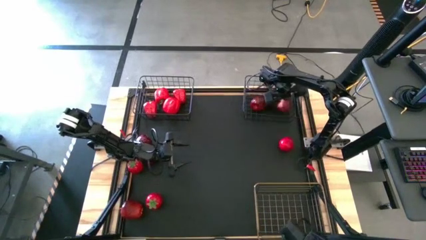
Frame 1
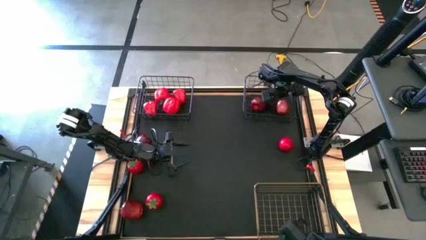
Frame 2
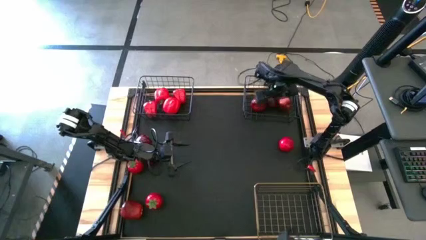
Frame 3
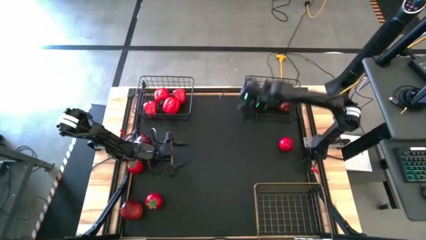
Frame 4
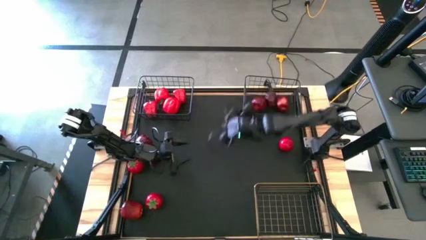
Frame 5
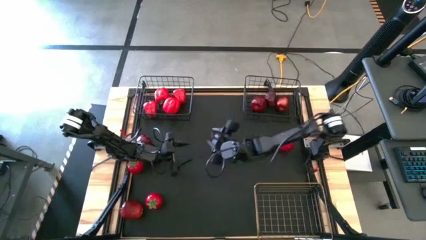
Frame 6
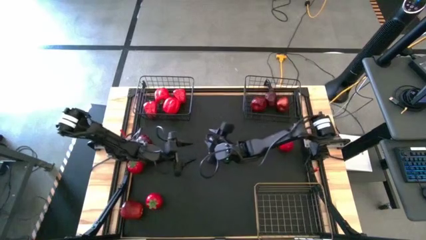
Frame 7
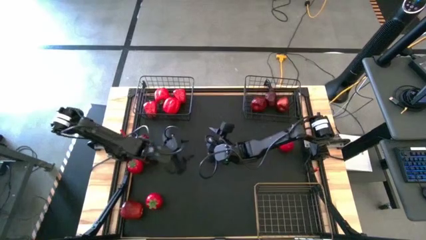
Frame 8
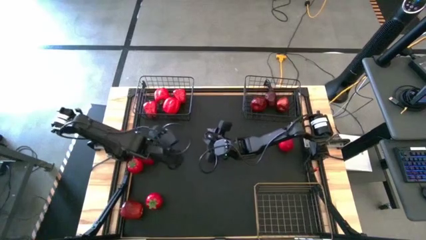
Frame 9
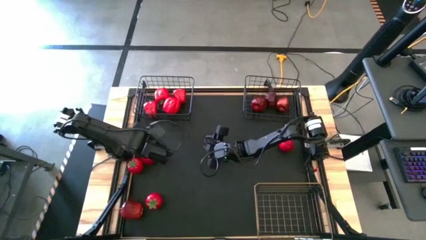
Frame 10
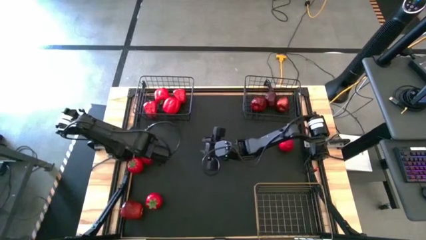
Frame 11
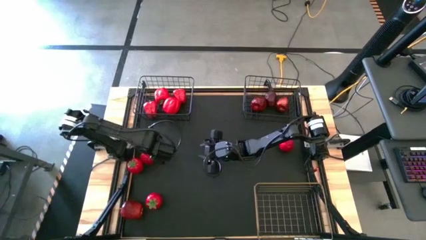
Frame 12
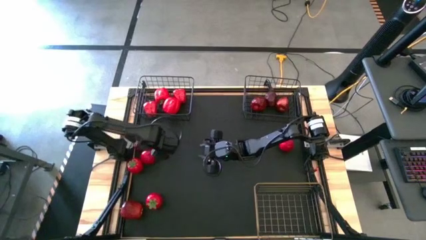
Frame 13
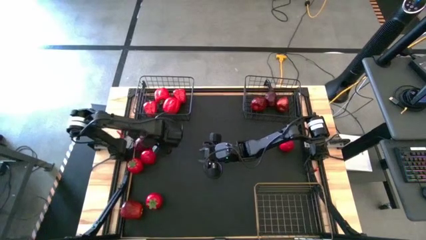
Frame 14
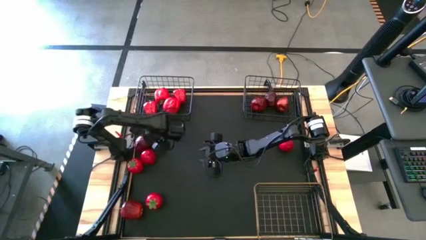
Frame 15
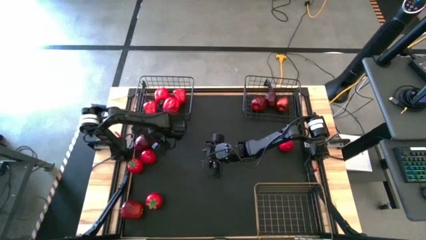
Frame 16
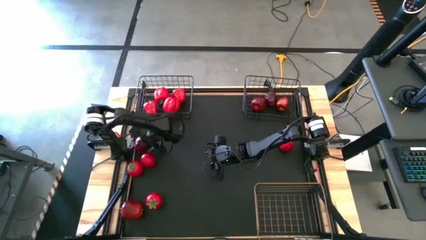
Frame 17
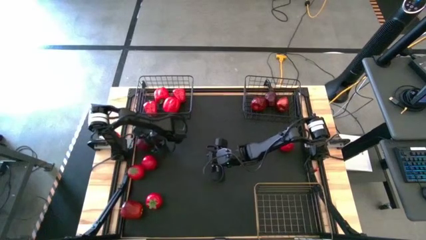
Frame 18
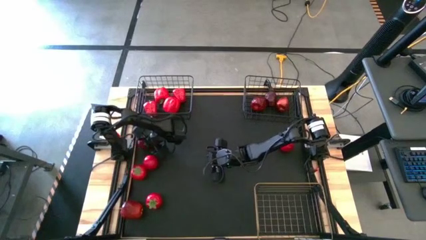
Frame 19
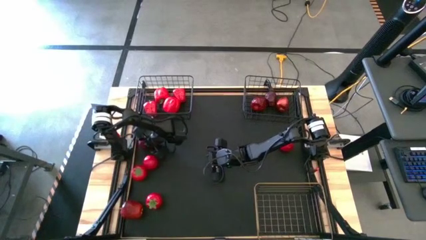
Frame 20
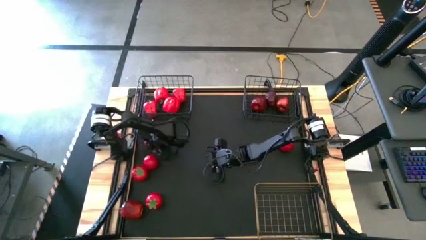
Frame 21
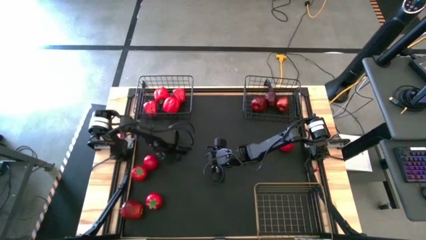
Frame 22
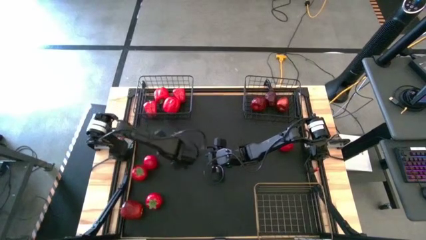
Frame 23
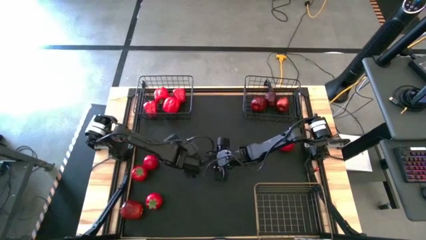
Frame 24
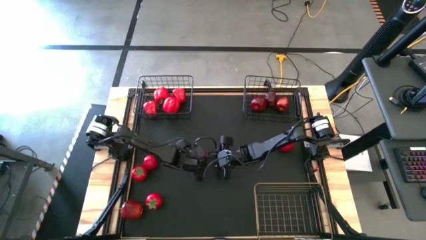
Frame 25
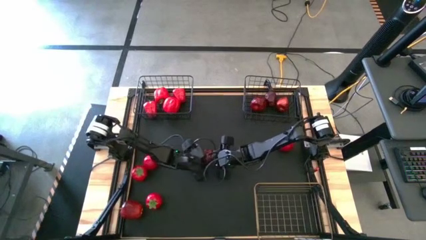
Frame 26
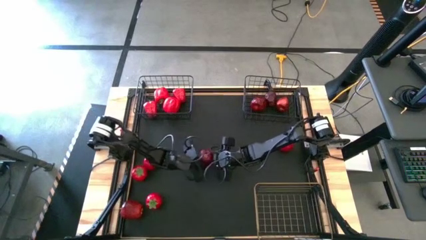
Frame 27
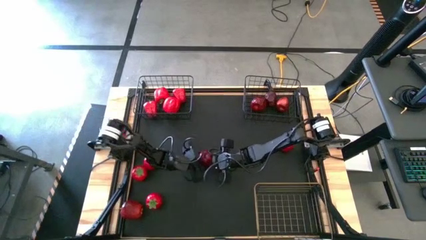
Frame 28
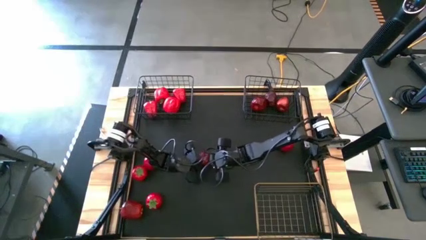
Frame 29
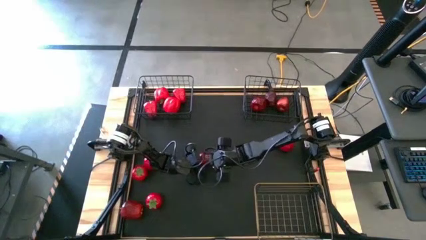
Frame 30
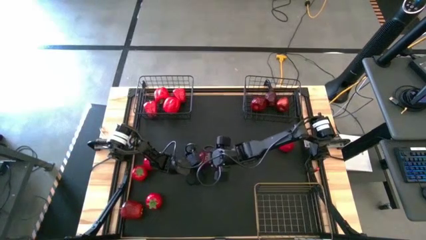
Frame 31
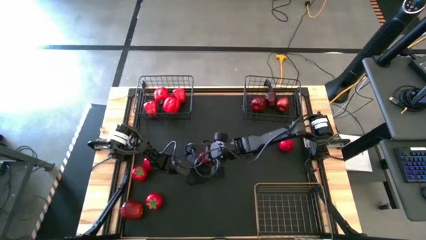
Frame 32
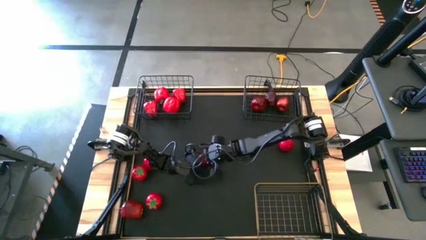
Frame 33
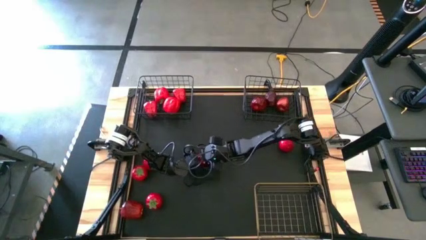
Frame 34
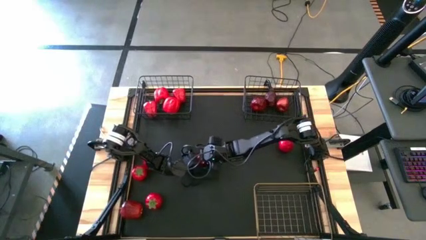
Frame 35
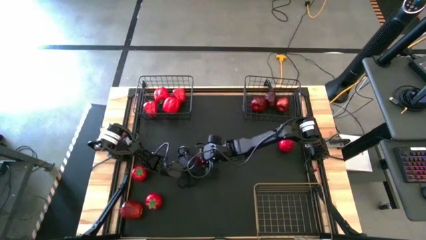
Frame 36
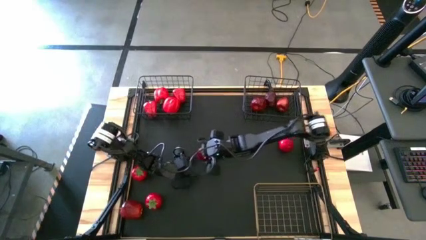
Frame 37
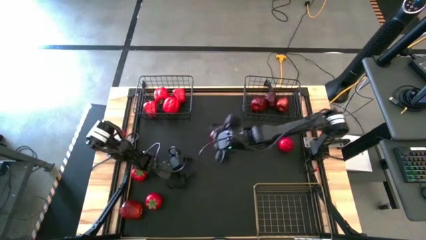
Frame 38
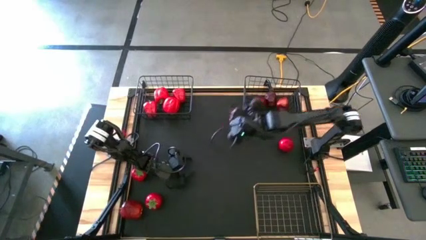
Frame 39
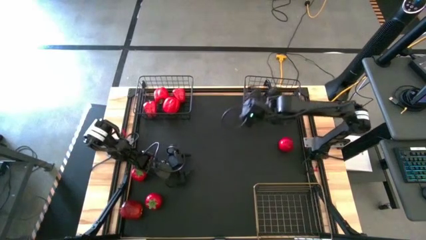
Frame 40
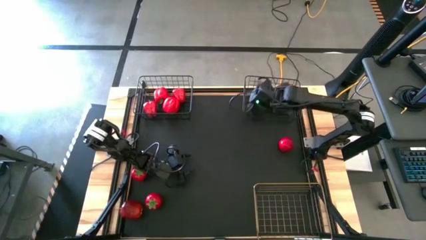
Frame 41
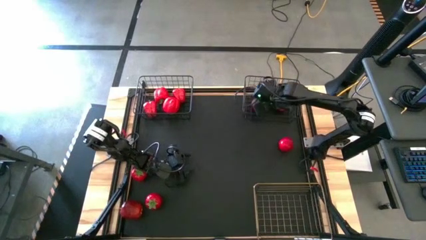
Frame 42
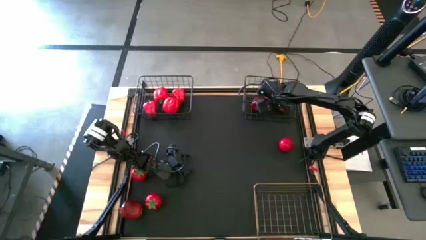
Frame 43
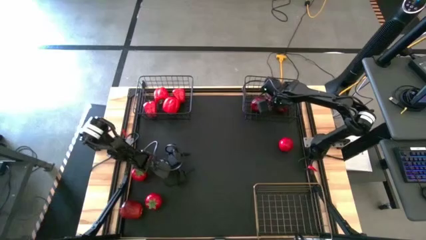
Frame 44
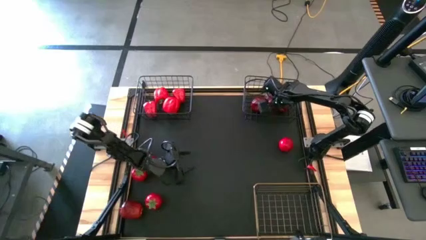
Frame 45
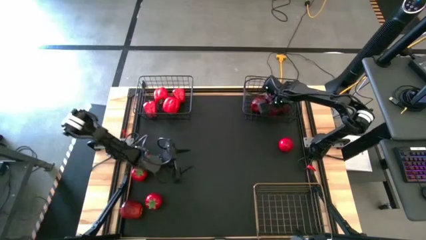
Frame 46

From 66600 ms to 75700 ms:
Task: Sort produce into baskets
Put the apple into the right black wire basket

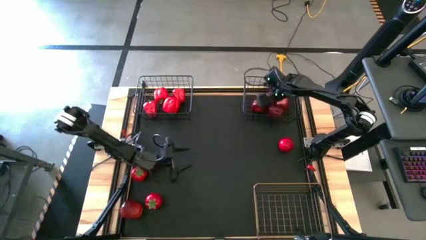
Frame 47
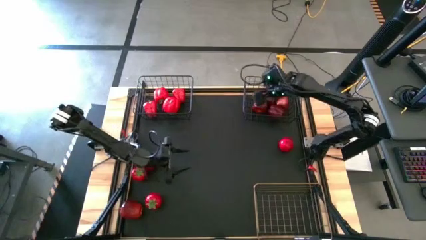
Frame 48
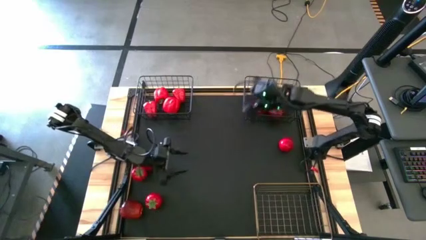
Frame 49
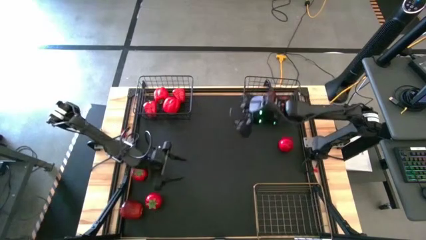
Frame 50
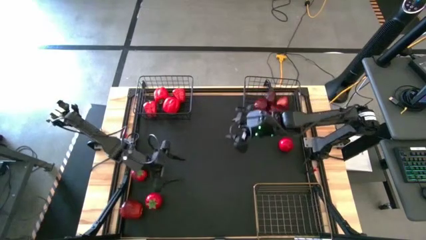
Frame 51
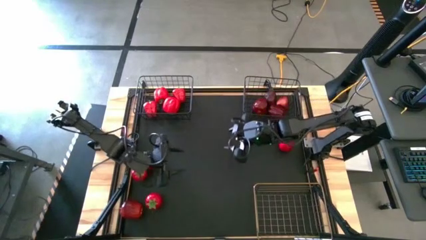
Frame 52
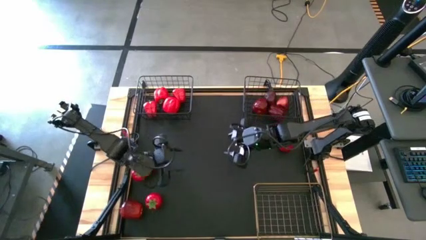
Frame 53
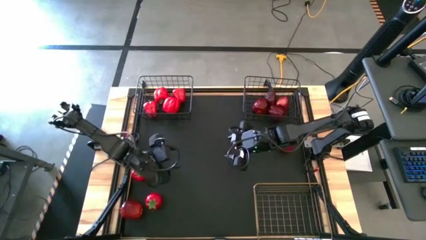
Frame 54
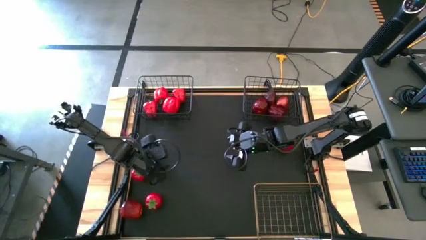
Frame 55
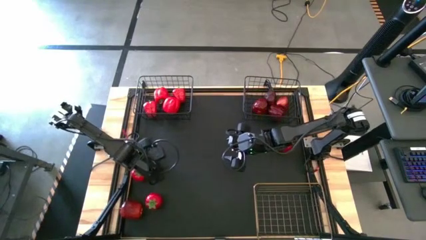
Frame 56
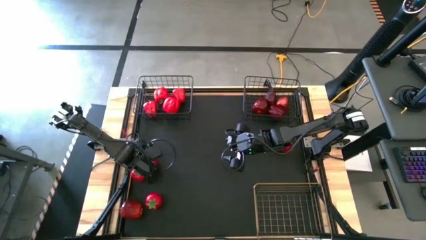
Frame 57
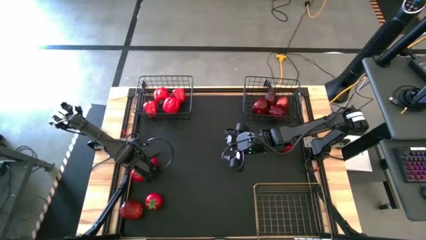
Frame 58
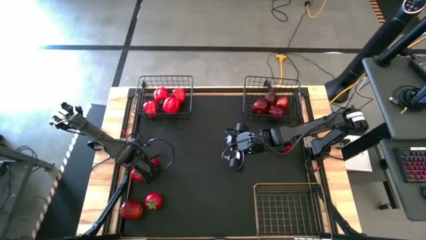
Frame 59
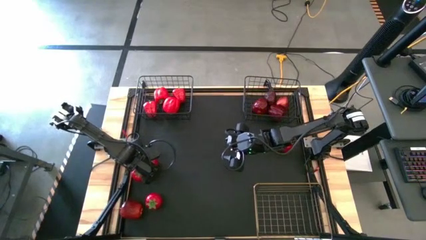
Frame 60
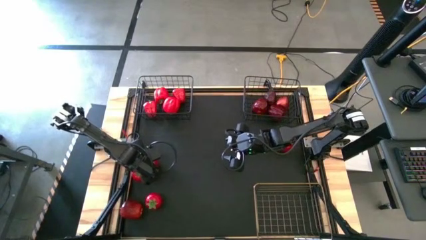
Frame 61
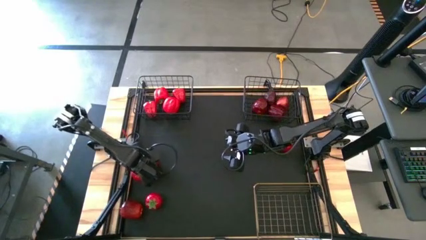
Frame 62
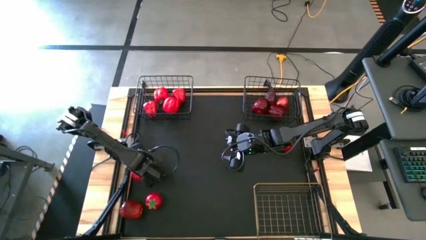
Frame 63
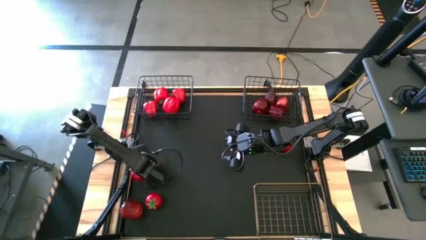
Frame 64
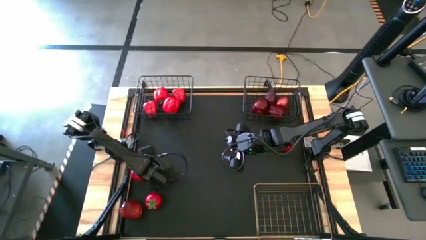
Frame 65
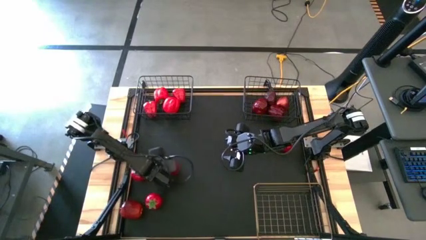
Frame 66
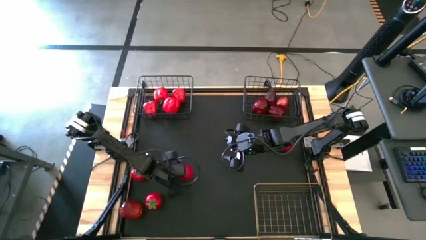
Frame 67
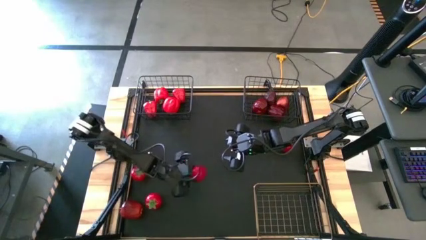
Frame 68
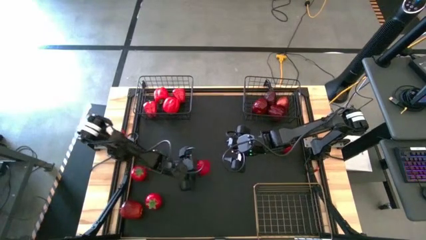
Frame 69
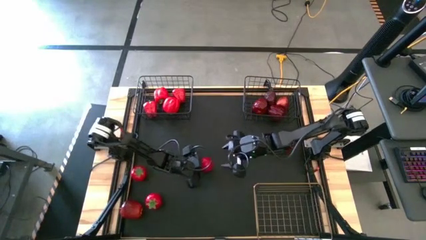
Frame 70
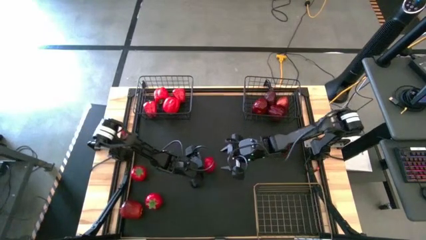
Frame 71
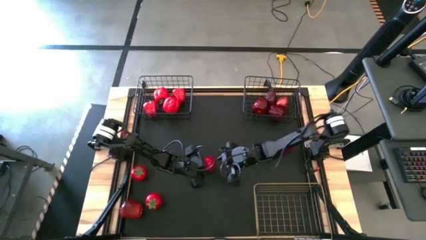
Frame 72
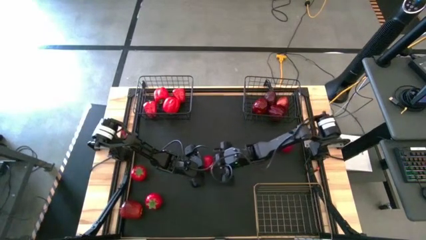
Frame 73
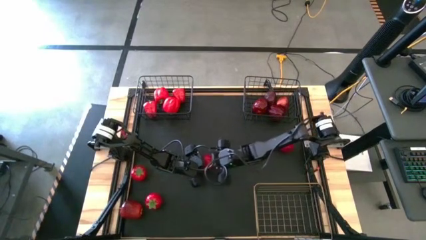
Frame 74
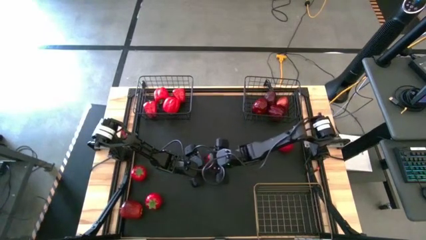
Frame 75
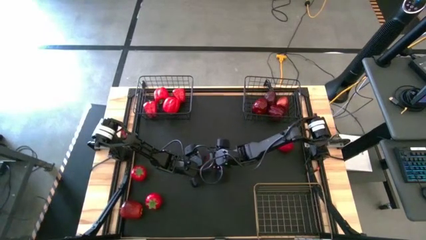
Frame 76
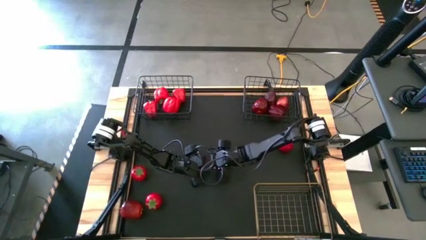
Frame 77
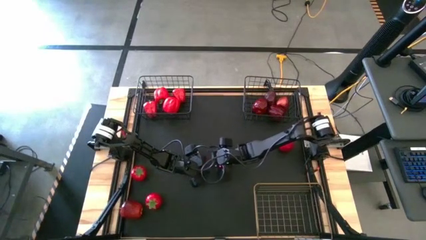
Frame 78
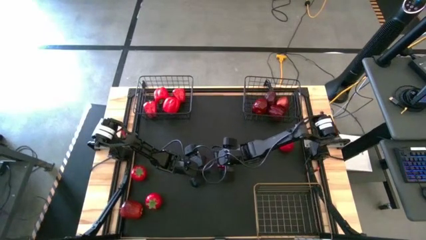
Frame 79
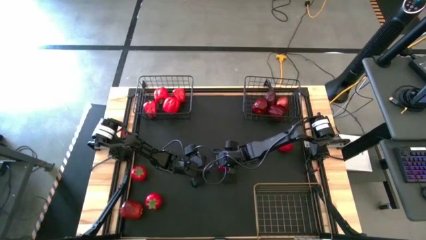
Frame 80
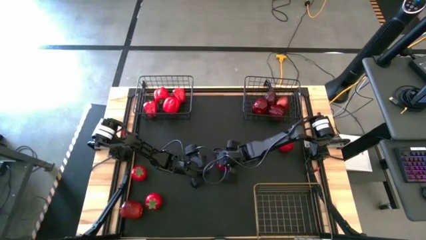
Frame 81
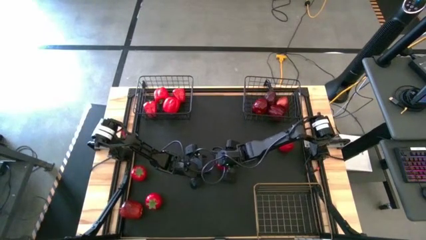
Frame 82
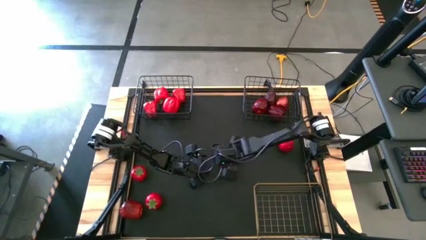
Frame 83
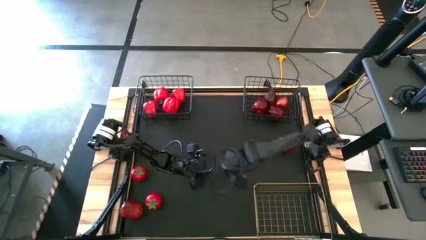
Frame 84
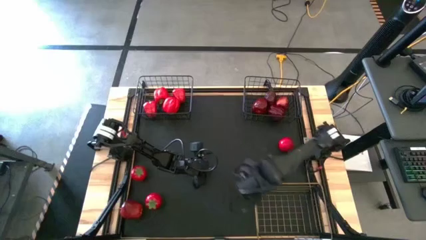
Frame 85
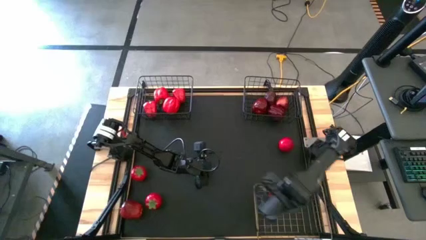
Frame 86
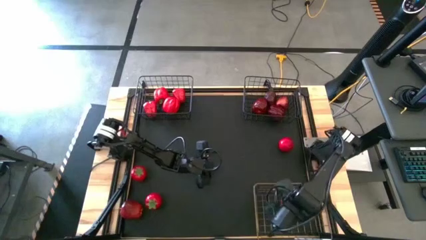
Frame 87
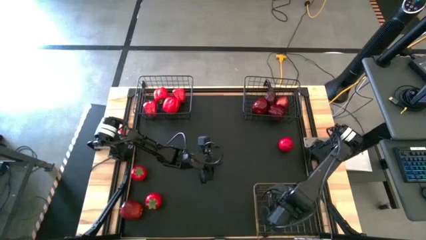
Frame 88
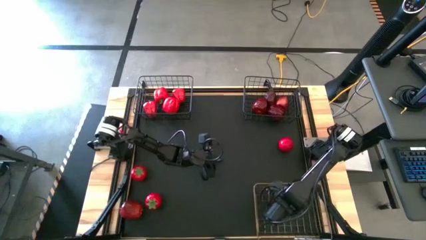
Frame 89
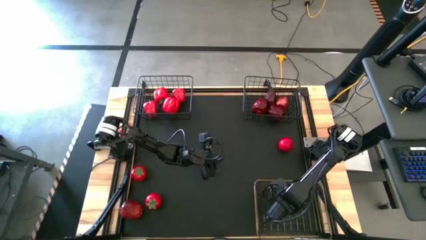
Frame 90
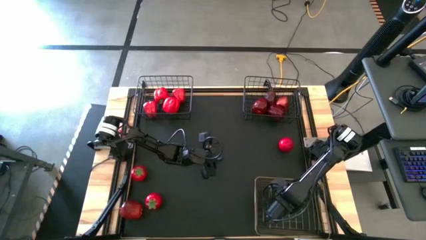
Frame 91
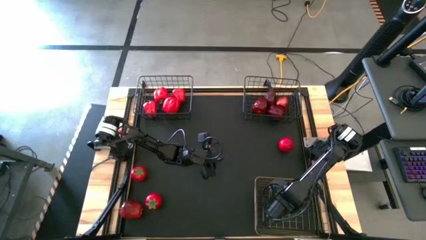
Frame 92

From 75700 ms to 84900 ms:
Put the tomato into the gold wire basket
